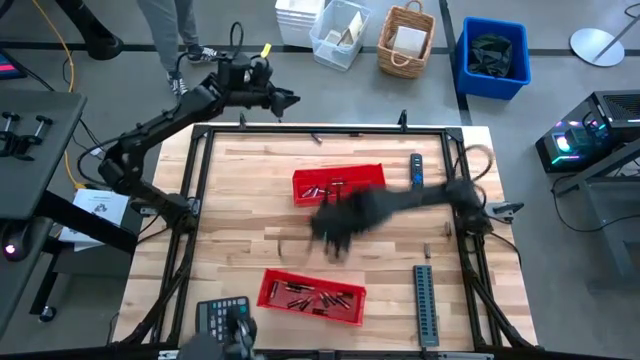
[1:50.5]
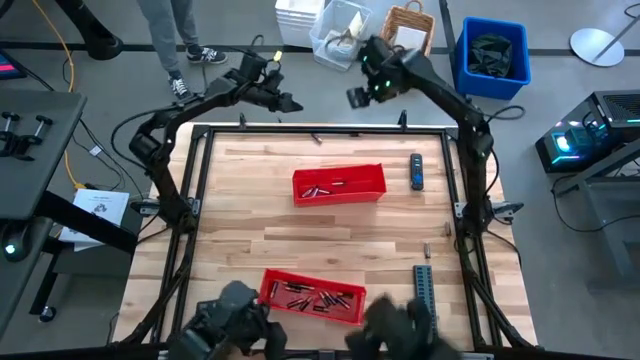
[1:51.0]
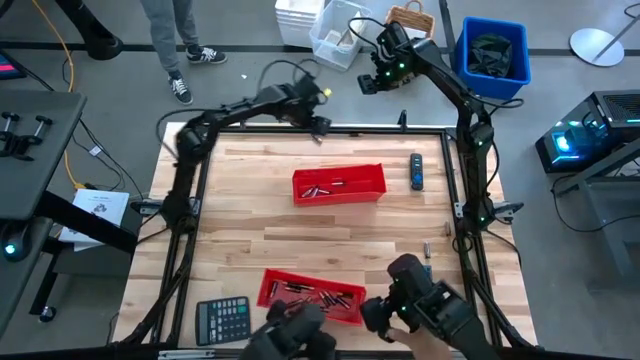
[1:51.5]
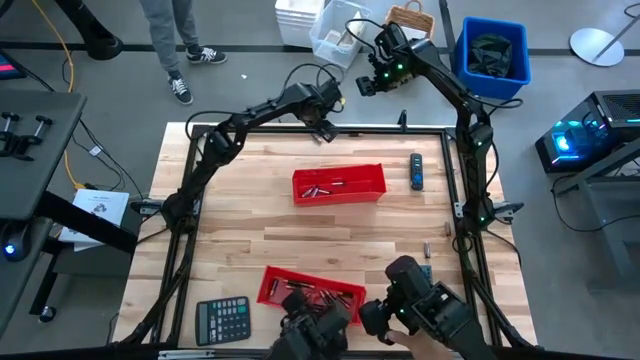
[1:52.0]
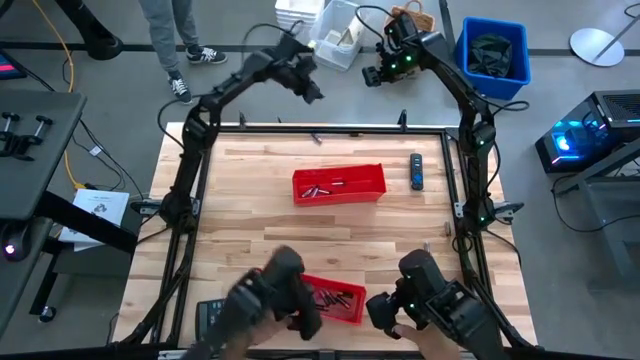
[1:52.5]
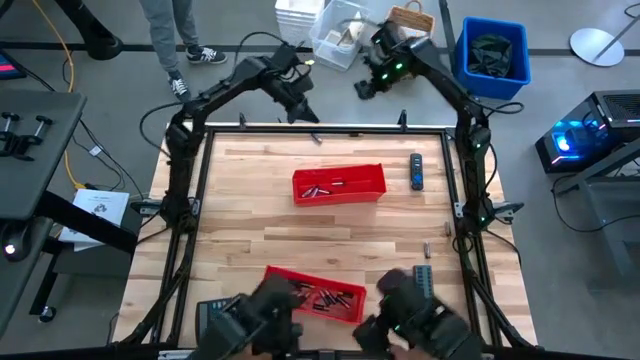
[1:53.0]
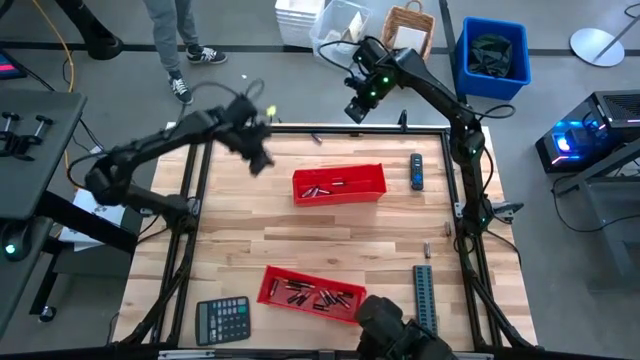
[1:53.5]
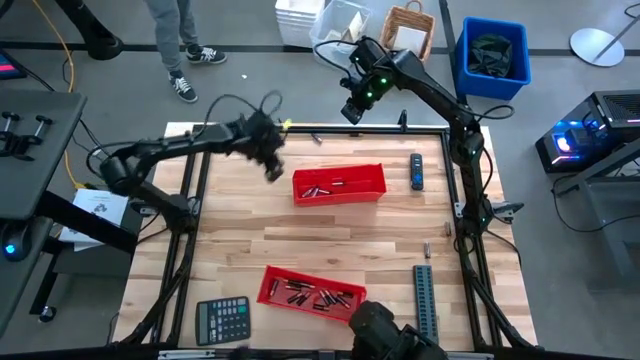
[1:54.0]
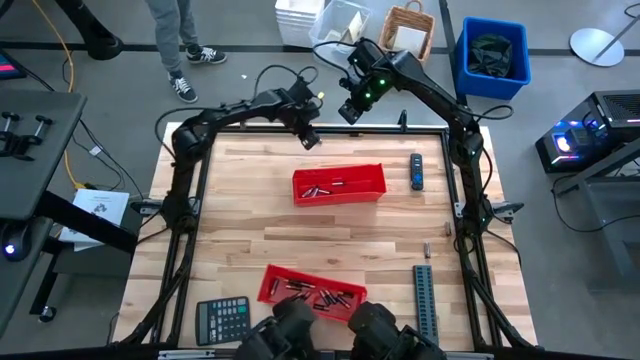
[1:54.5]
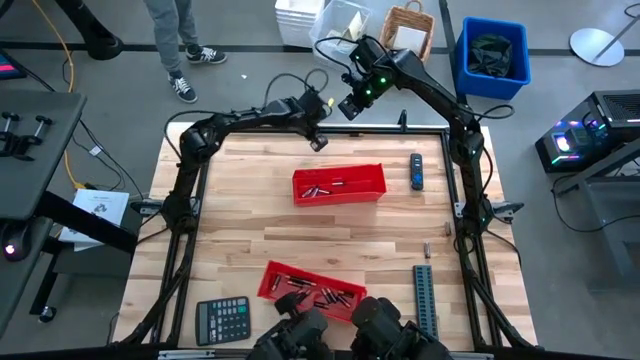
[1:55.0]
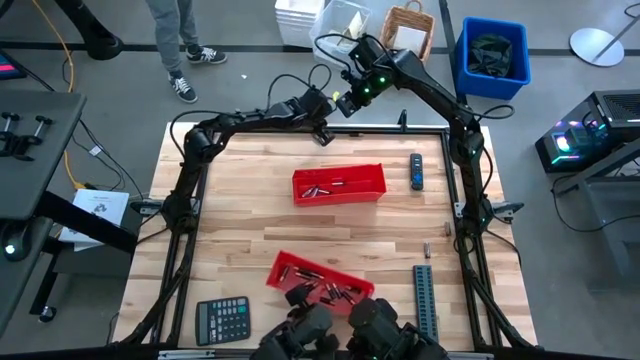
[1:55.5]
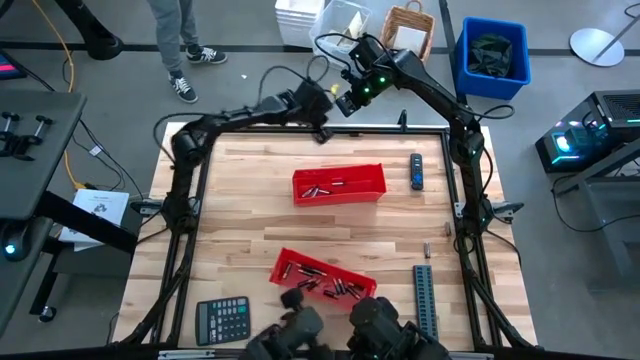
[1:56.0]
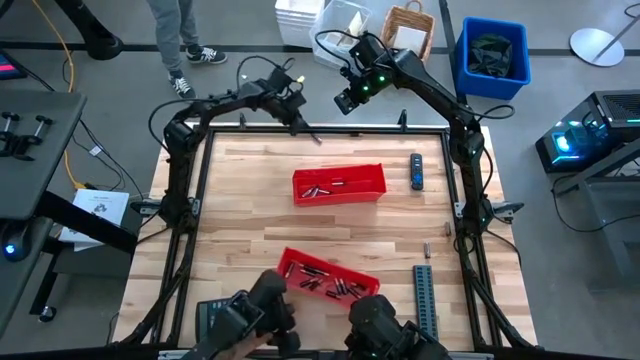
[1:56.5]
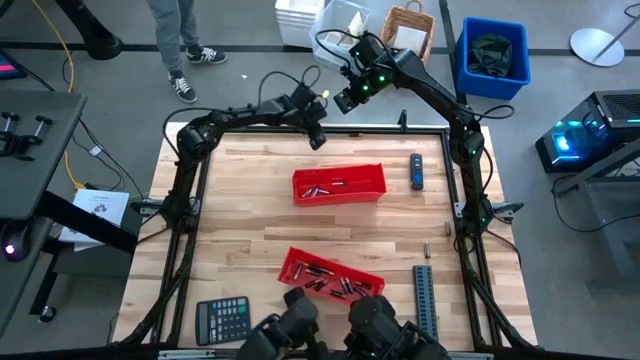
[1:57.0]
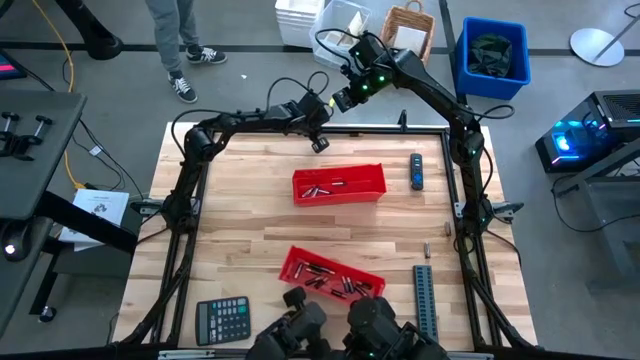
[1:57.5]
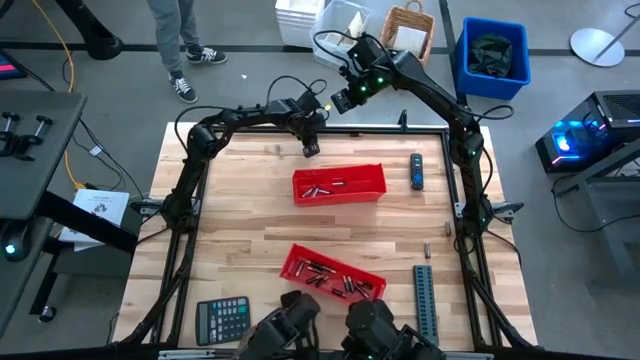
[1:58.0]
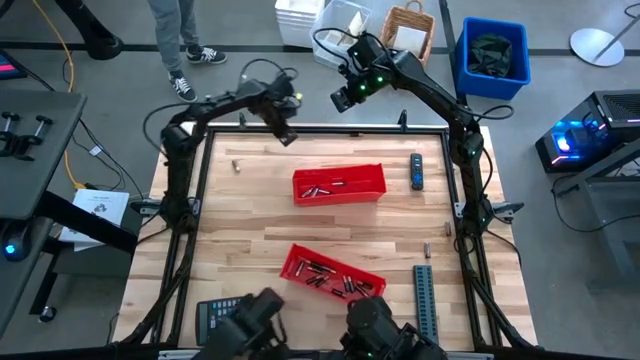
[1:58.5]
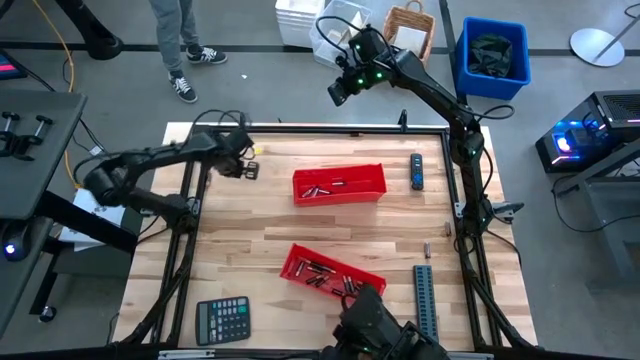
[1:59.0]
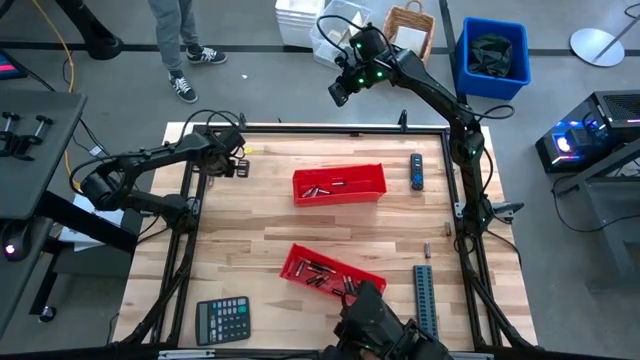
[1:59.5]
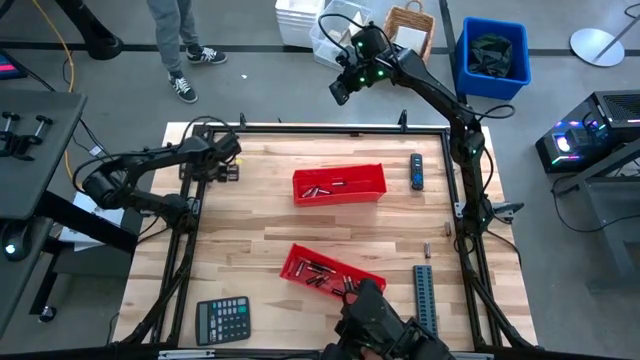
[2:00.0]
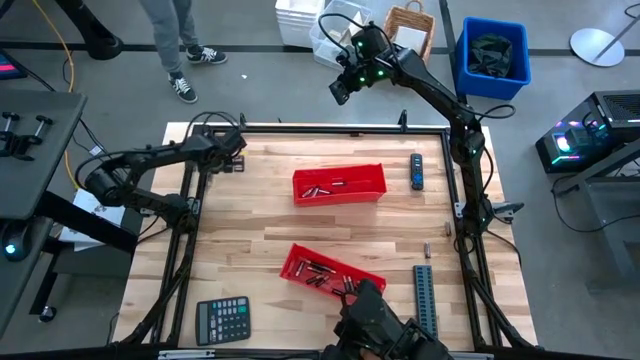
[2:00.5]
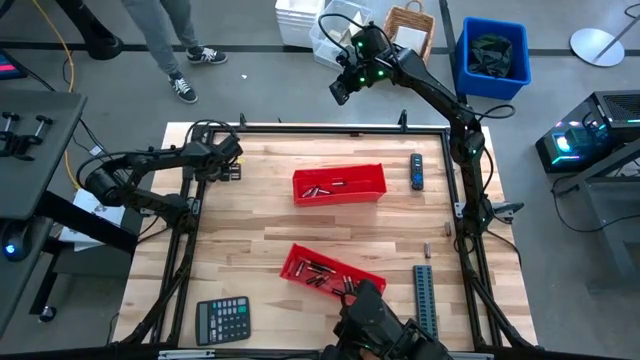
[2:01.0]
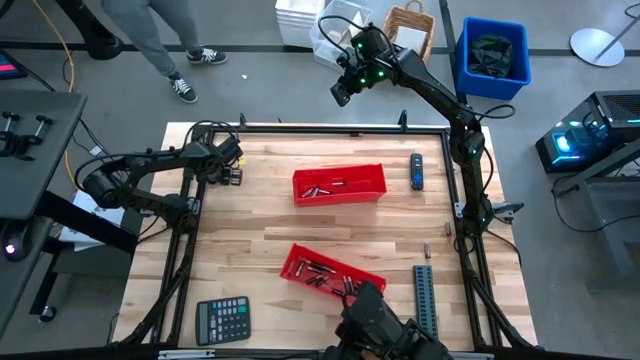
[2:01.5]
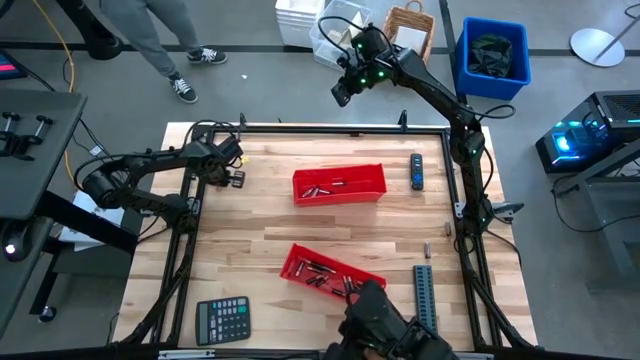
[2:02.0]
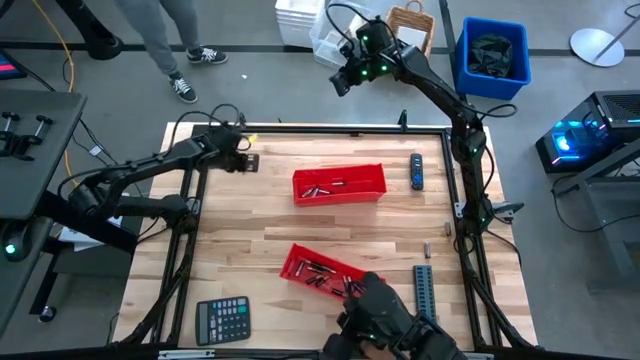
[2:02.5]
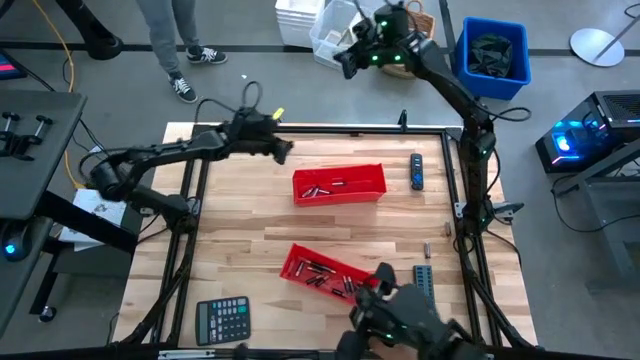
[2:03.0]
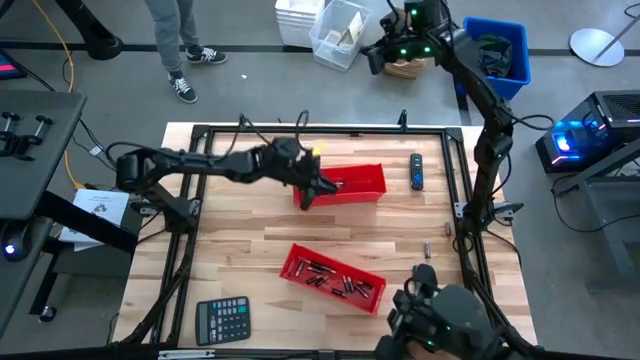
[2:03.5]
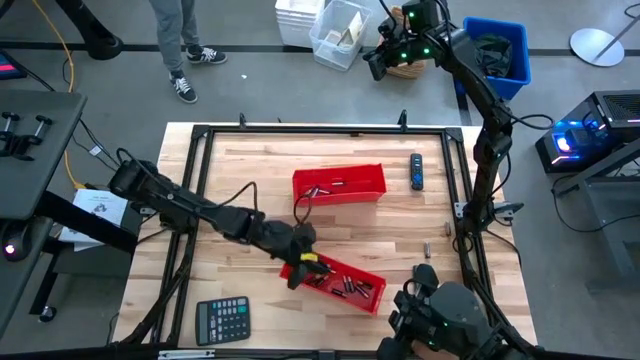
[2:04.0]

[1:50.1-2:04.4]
Task: Sort batteries
Put the black battery into the bottom red bin

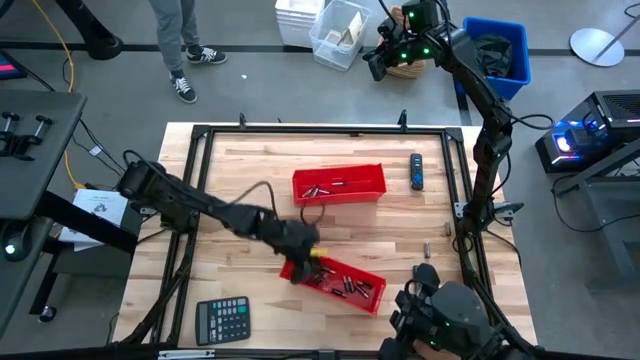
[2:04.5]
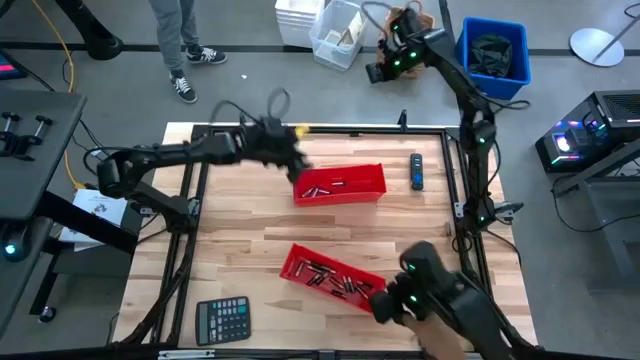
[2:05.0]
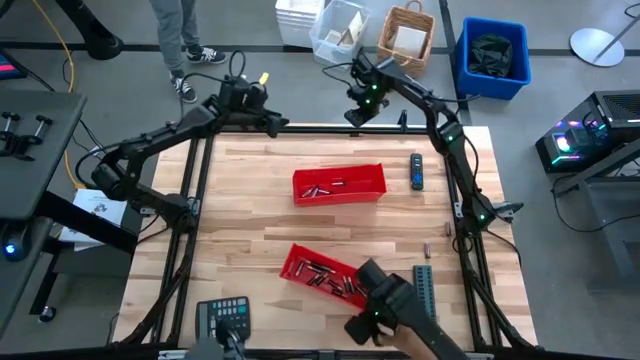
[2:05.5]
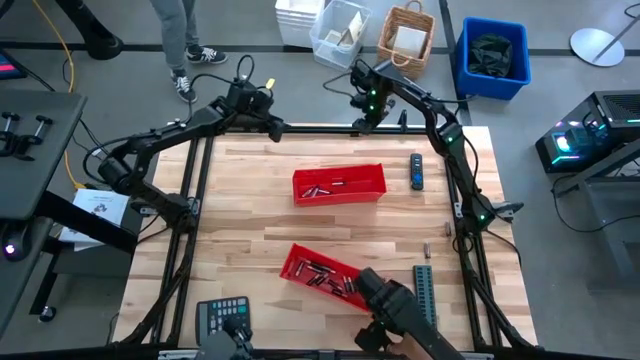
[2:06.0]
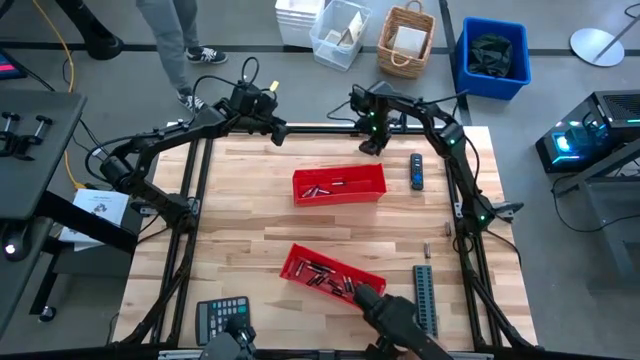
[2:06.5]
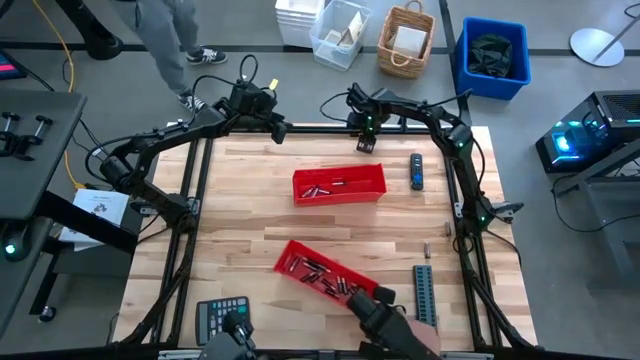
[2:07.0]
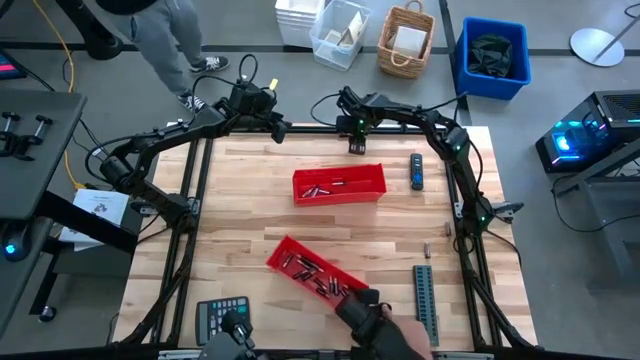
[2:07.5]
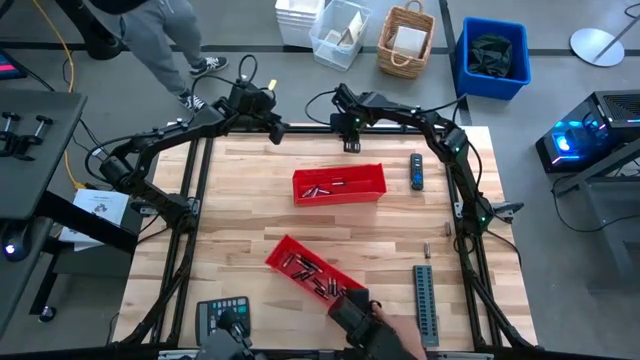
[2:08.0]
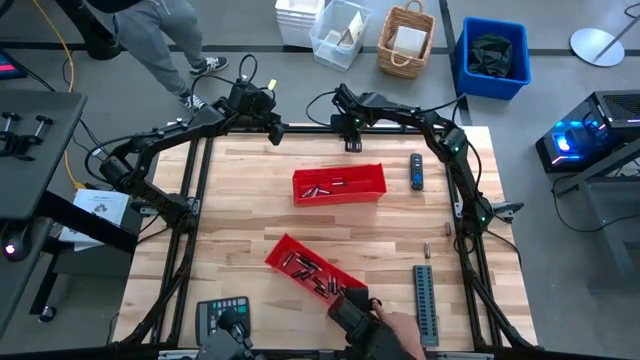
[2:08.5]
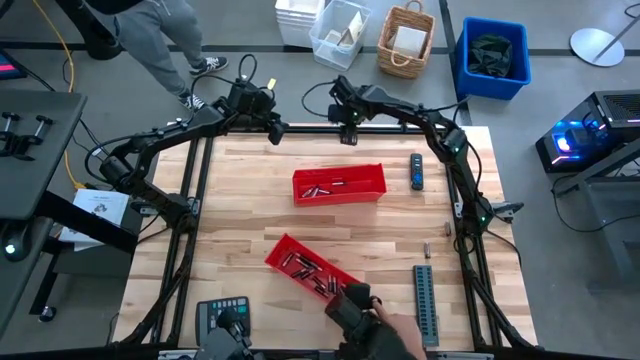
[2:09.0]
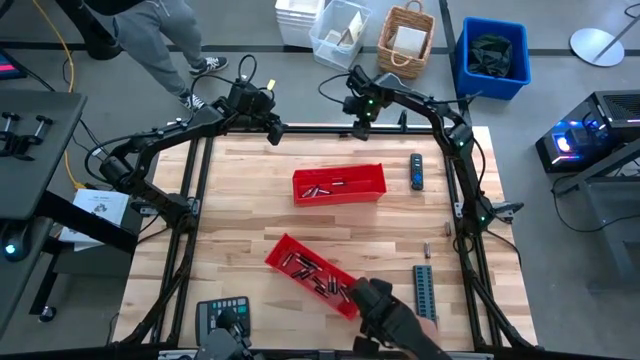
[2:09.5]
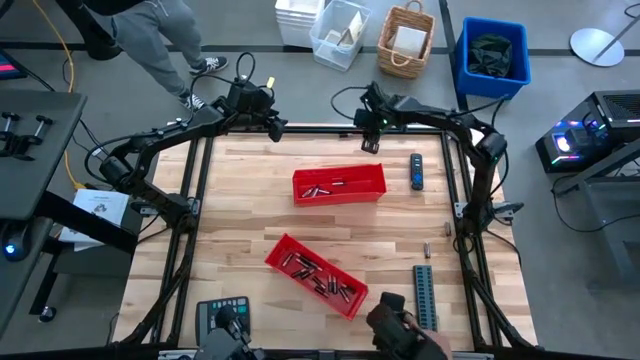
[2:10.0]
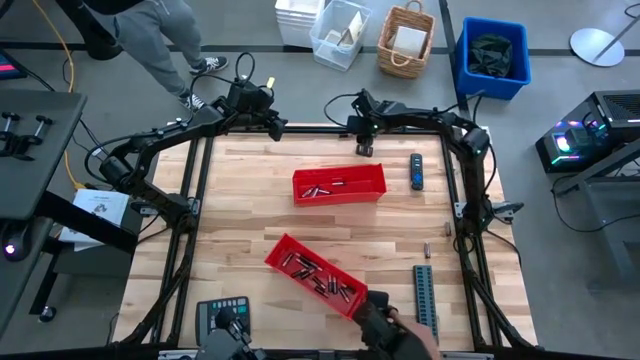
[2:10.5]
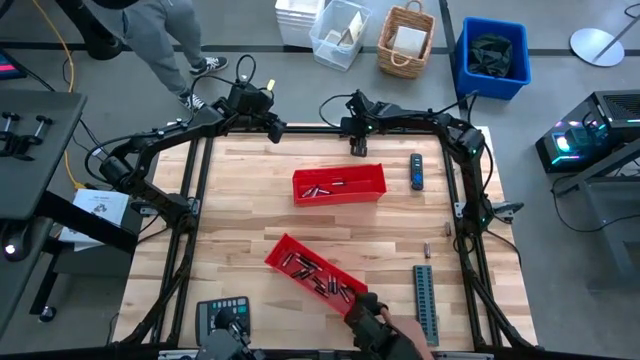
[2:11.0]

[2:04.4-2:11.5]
Put the black battery into the bottom red bin

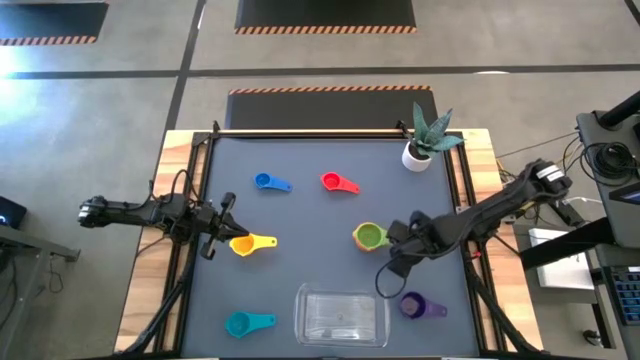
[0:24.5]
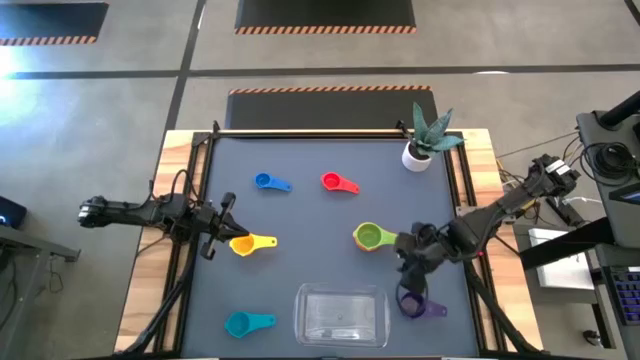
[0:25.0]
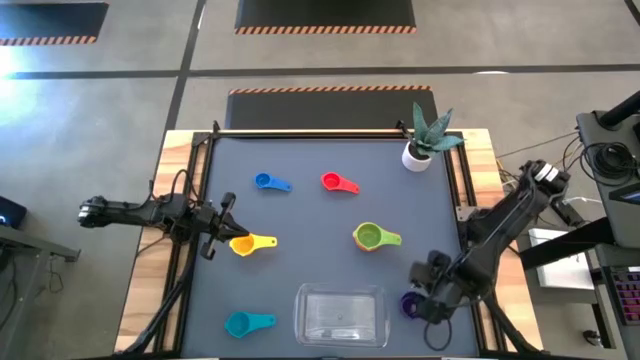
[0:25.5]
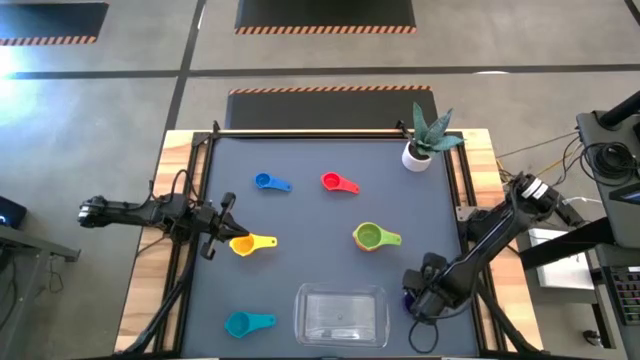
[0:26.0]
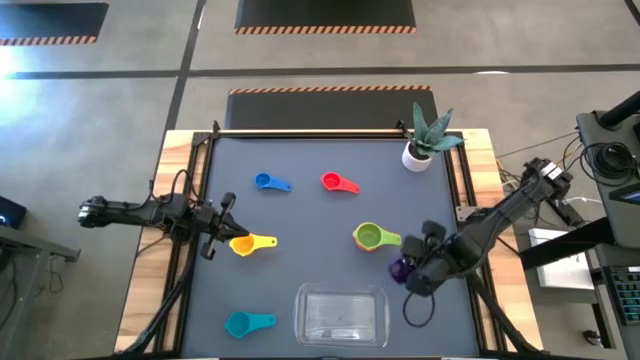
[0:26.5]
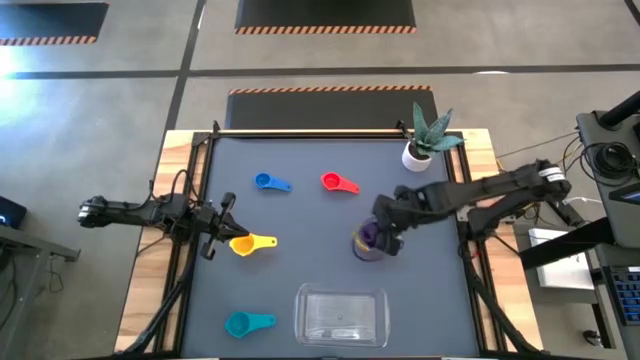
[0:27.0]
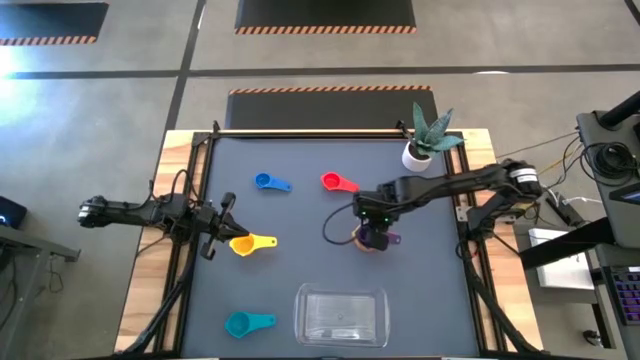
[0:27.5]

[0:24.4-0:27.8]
Task: Nest measuring cups in basket
Stack the purple measuring cup into the green measuring cup
